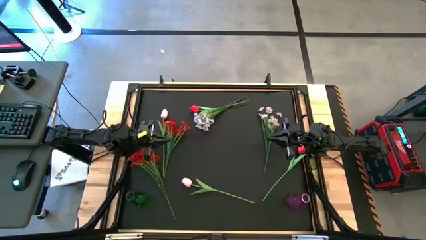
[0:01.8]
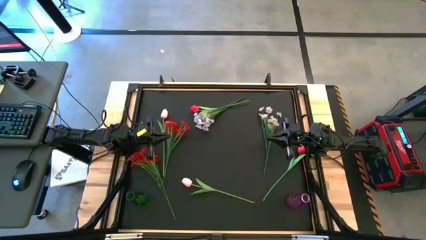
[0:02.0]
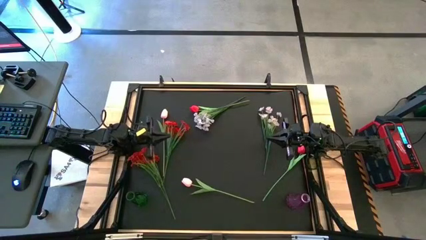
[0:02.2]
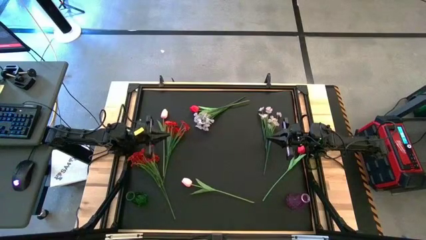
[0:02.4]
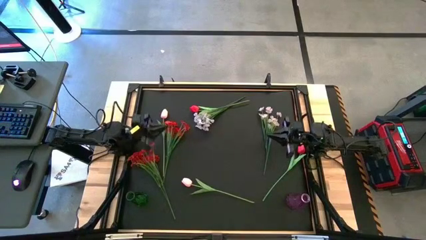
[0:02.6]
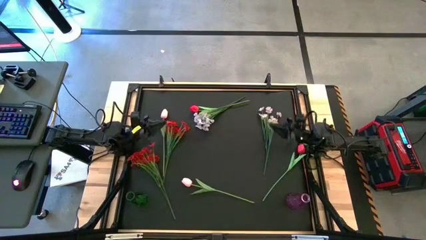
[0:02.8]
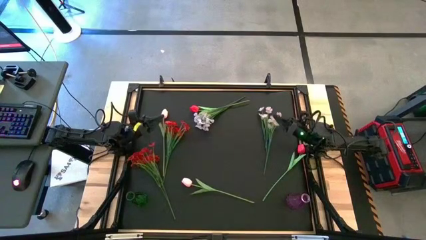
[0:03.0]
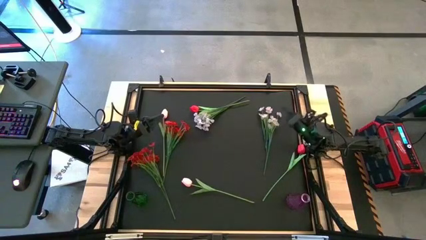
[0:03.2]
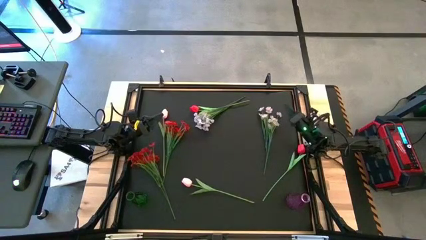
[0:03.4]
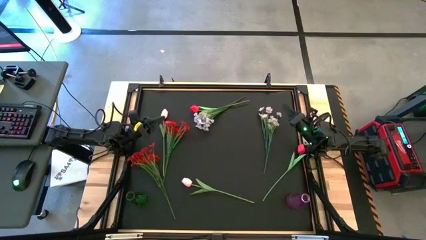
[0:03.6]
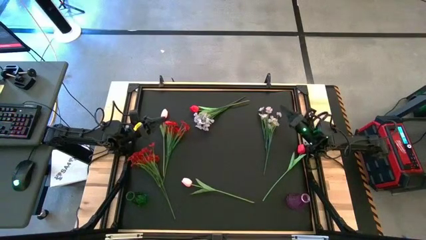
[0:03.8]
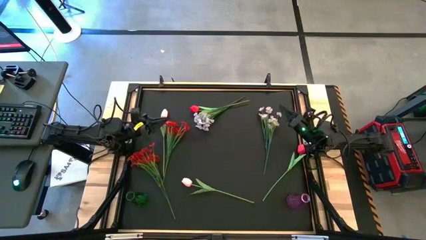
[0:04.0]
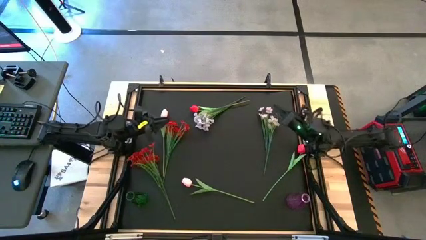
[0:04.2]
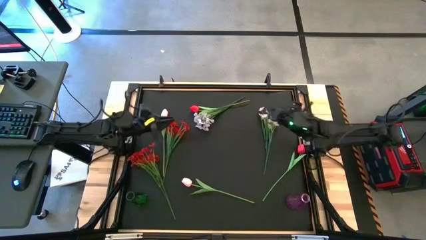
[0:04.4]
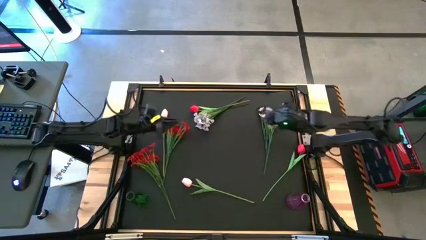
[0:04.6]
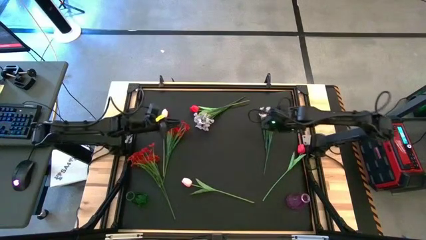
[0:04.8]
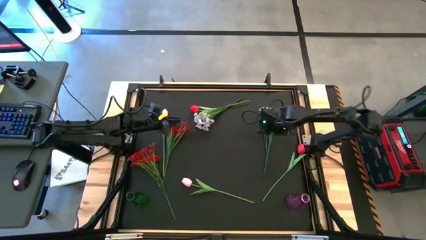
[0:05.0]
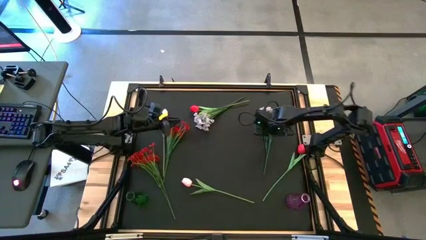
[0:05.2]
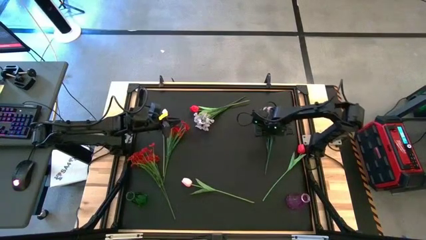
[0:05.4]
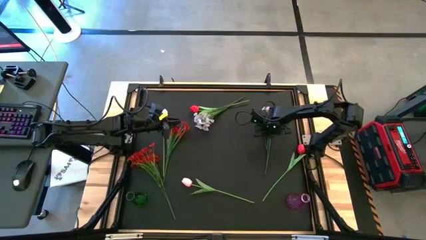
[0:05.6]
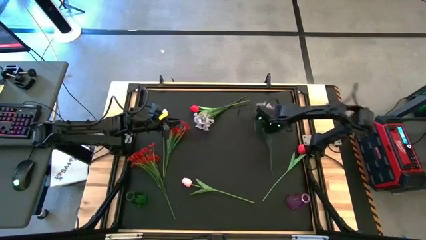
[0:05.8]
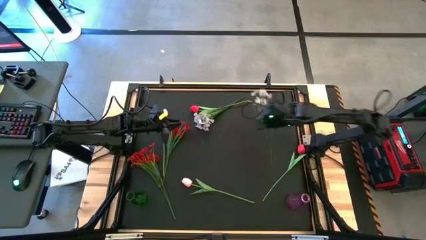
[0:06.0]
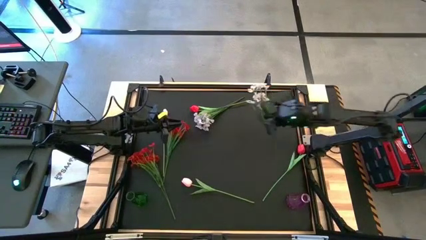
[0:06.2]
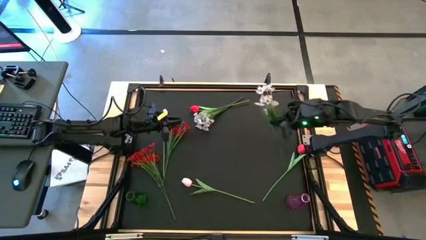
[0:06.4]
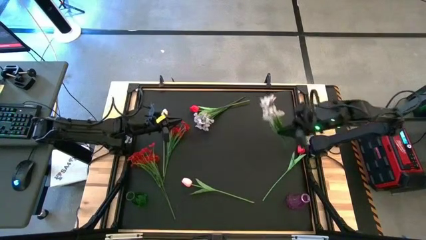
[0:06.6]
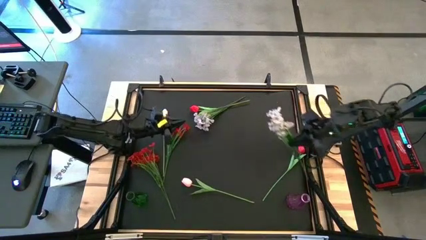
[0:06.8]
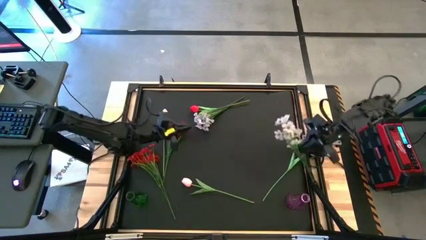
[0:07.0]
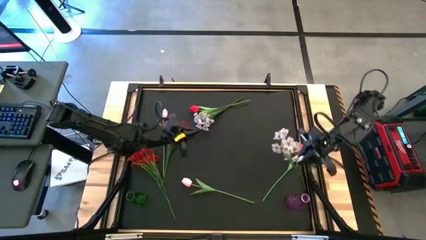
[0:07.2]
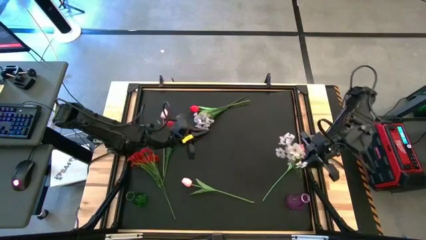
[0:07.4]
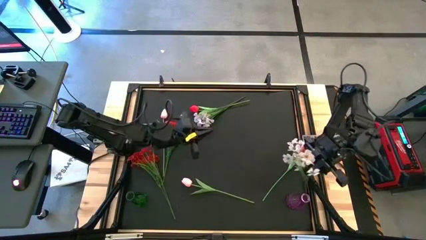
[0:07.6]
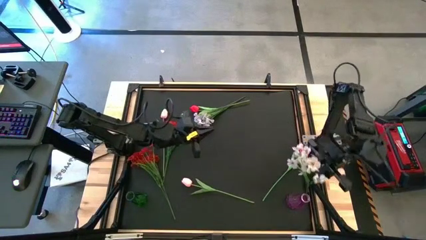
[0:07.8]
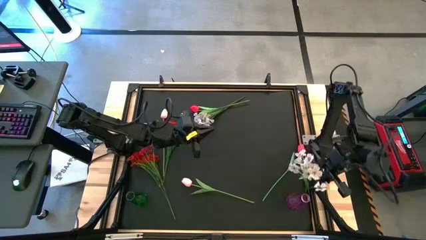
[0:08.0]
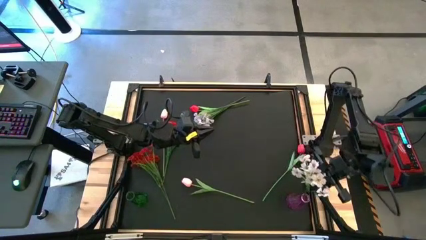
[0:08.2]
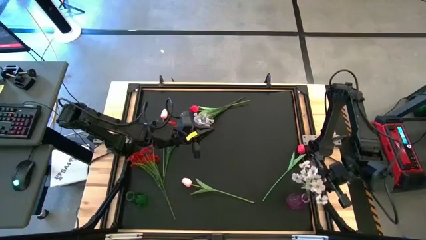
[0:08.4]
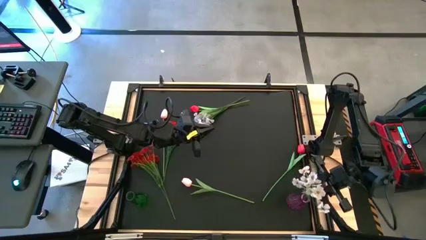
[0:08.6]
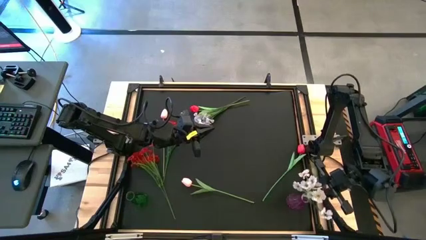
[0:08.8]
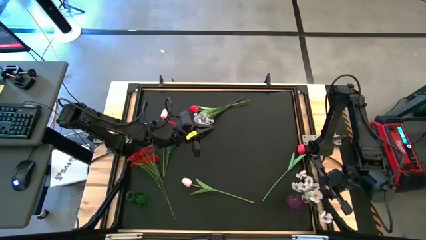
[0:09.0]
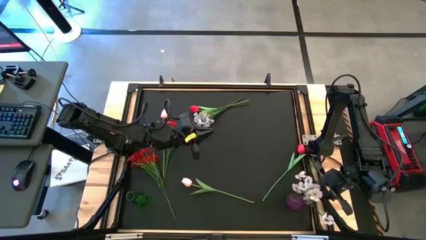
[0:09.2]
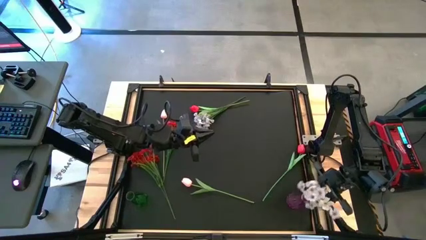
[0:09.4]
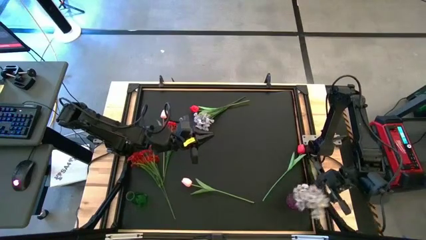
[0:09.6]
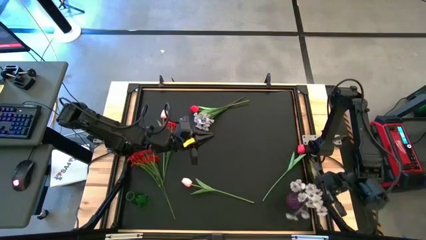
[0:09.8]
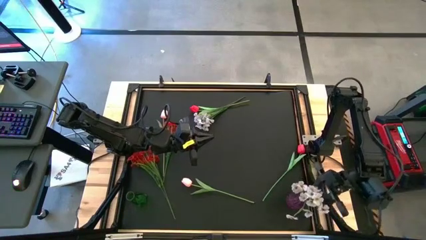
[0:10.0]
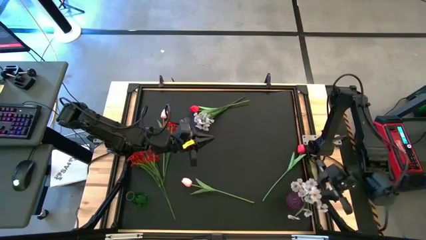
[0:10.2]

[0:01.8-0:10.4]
Task: Sort flowers into vase by color
Put the right white flower into the pink vase

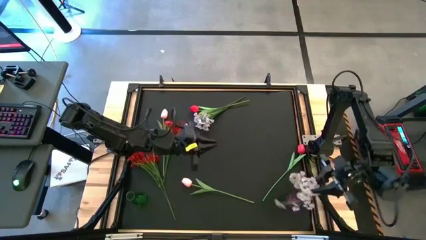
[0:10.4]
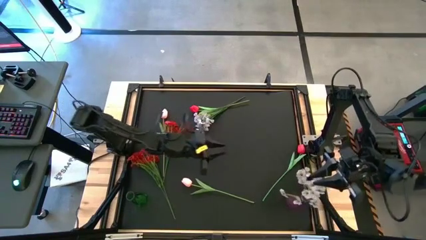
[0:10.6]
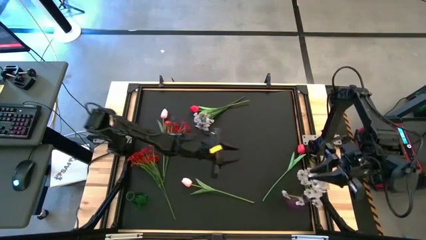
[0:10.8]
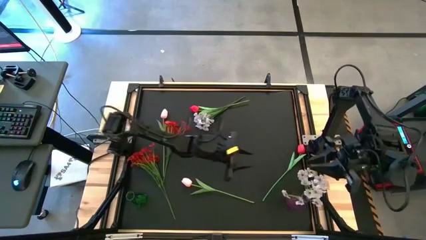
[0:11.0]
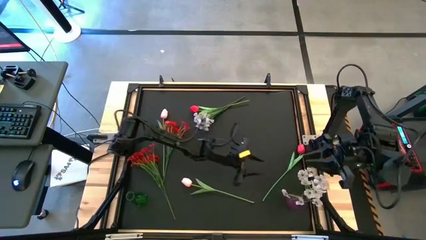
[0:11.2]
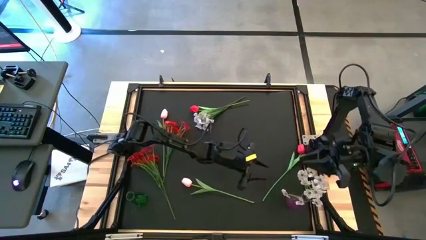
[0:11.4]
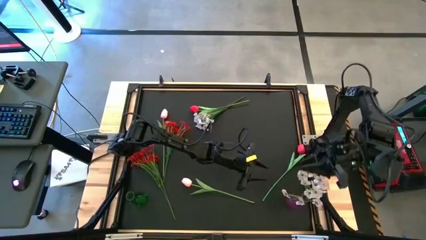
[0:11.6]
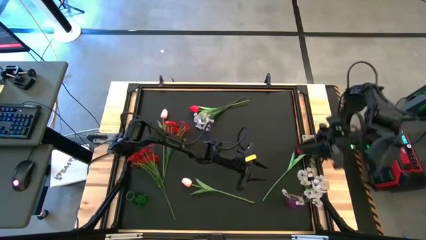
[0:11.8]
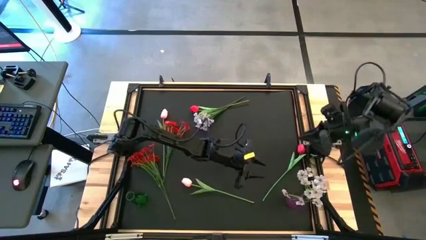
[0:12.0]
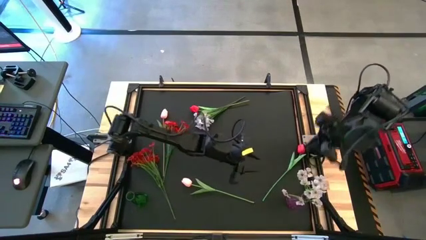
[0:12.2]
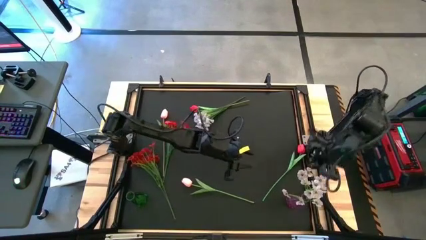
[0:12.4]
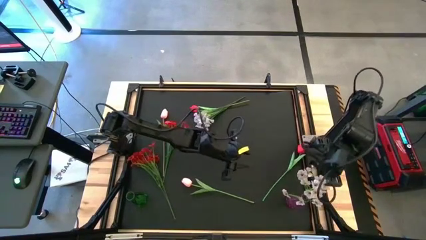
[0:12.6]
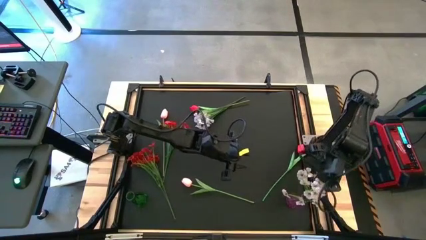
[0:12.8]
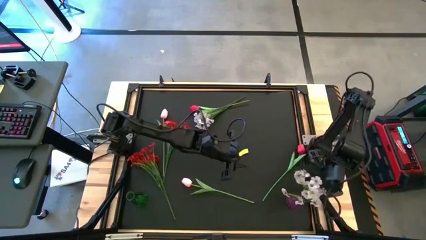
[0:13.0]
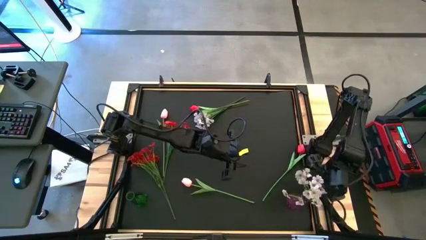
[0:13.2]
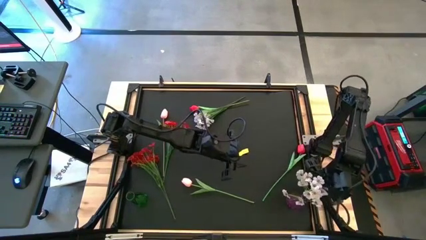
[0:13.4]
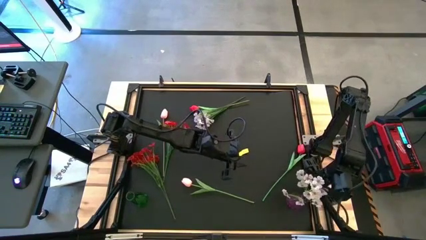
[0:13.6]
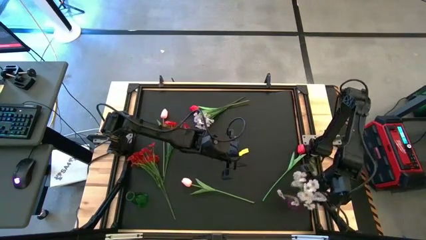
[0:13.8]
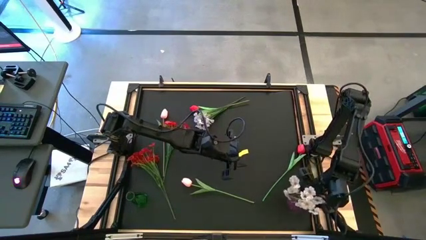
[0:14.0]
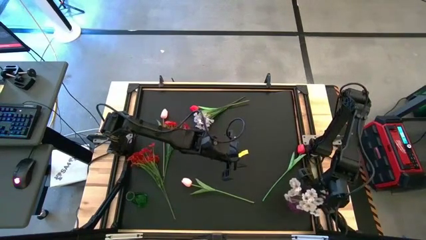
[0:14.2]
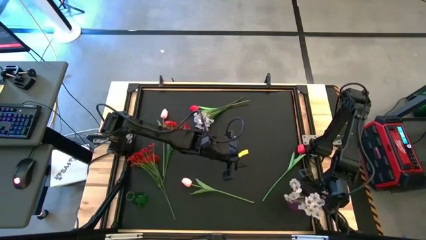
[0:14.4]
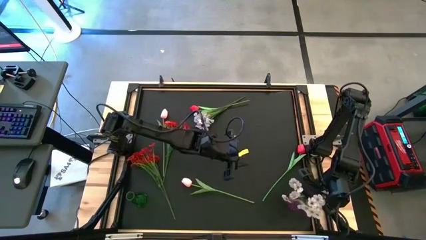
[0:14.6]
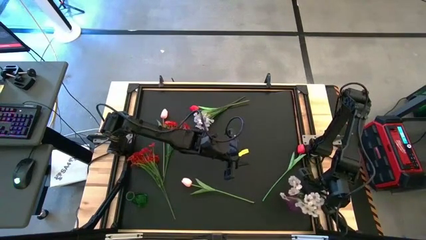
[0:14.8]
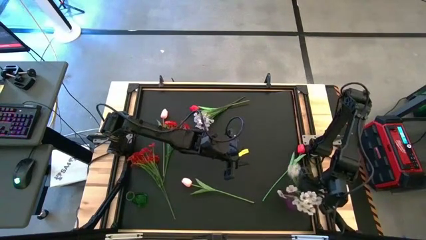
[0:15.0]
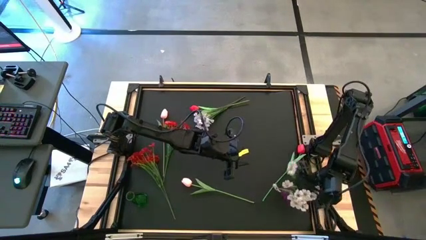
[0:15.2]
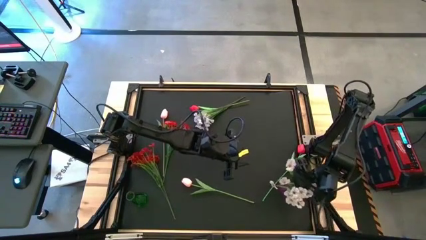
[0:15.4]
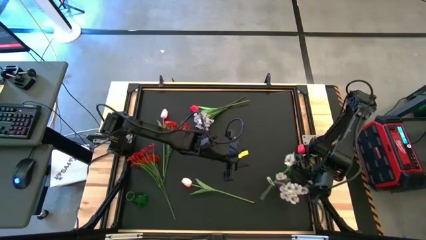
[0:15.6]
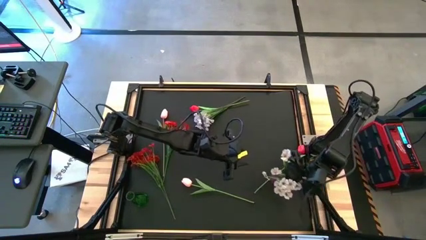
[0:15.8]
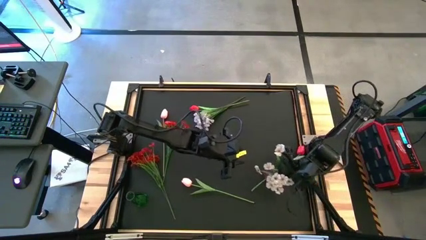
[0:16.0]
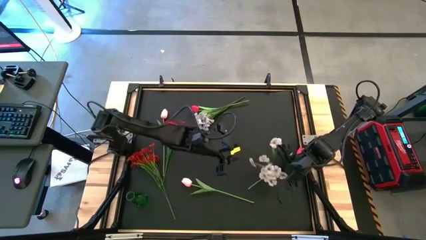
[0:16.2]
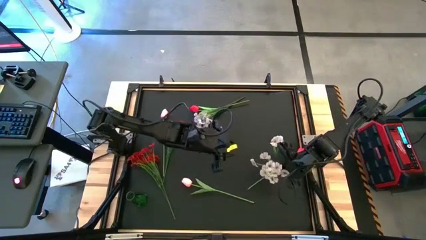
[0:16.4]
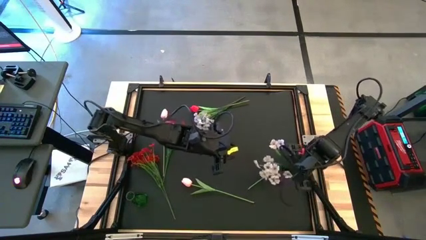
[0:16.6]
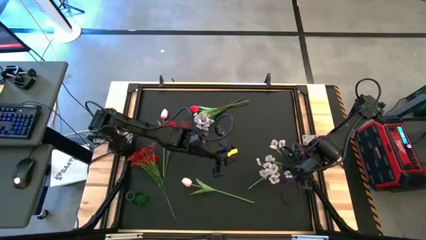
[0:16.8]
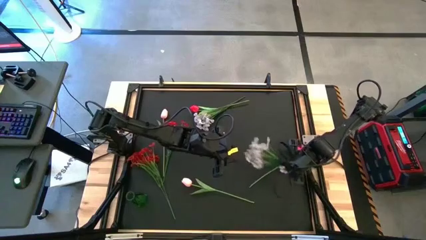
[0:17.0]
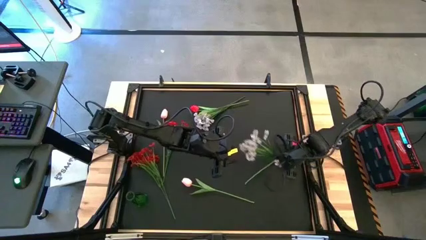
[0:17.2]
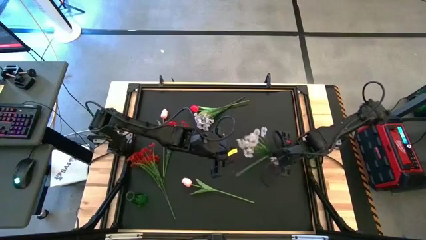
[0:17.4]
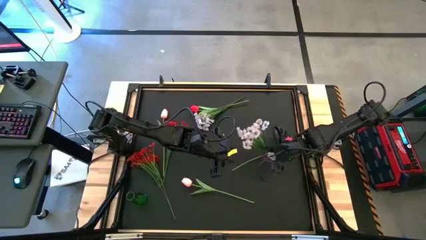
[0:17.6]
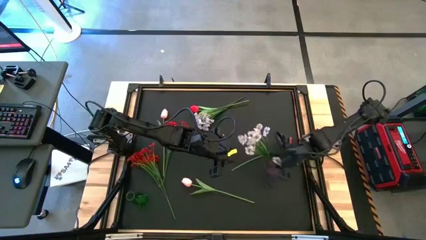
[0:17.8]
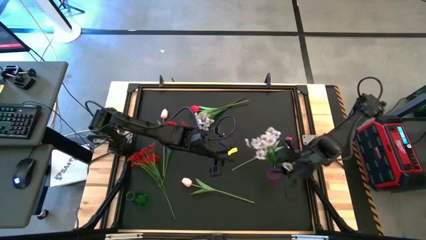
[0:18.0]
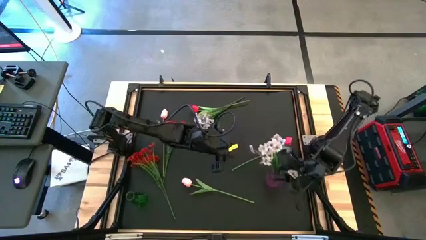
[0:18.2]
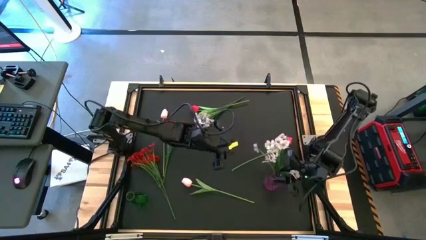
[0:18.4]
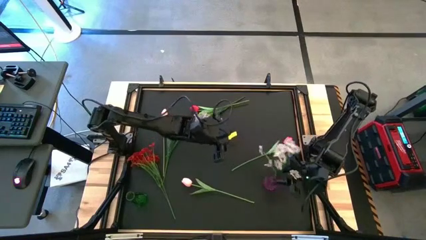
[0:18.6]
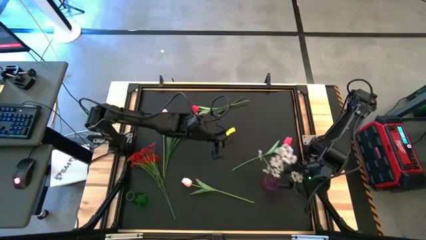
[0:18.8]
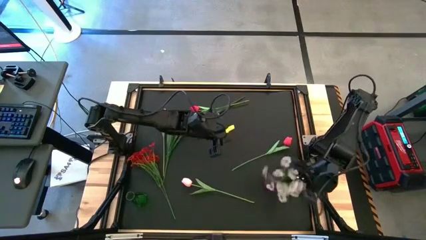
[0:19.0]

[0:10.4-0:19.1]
Adjust the pink vase
